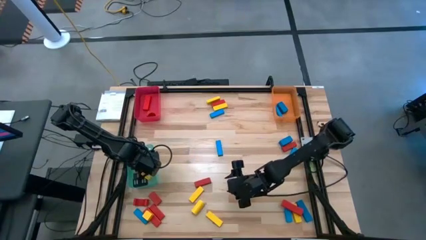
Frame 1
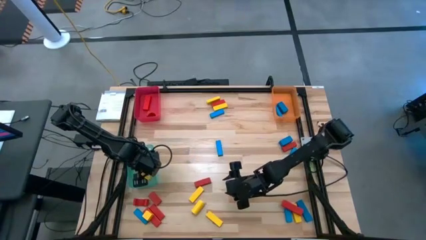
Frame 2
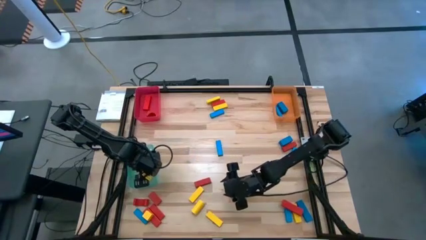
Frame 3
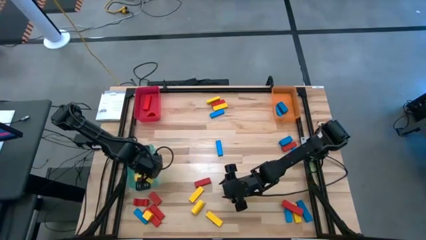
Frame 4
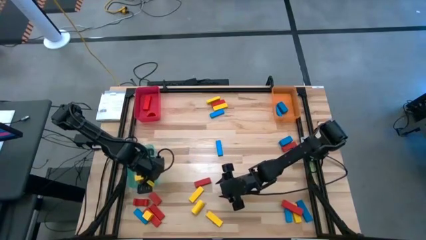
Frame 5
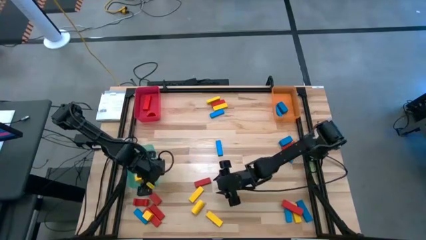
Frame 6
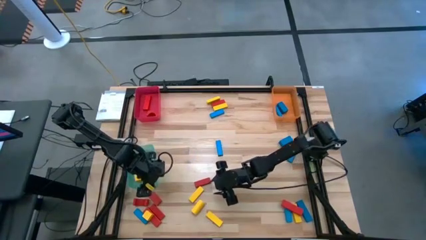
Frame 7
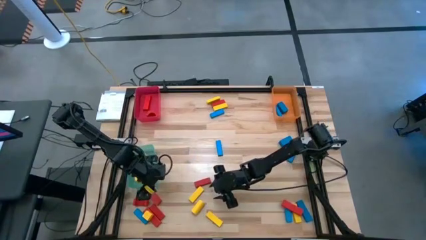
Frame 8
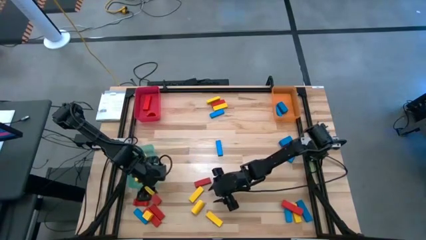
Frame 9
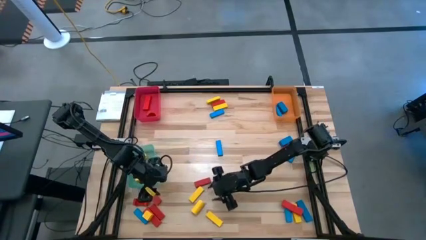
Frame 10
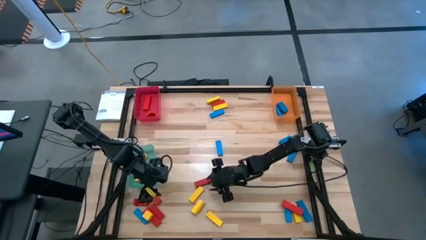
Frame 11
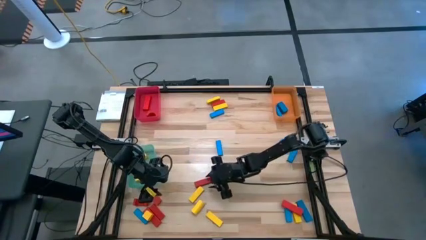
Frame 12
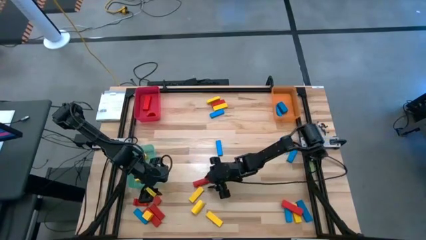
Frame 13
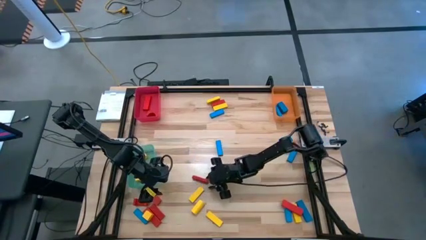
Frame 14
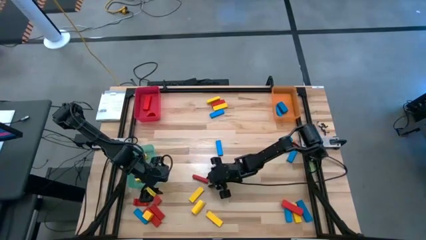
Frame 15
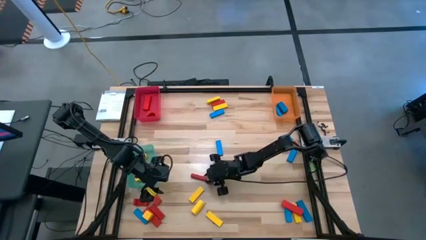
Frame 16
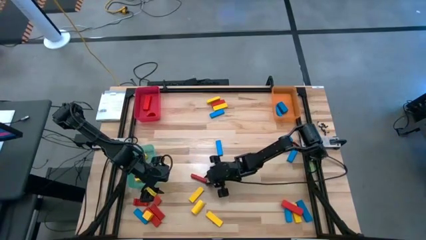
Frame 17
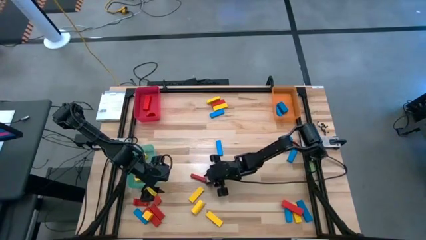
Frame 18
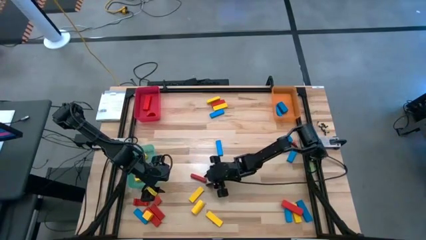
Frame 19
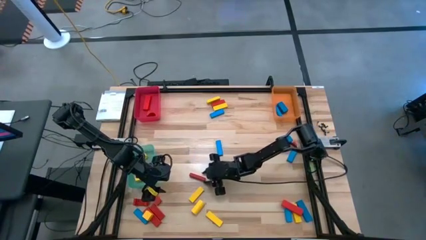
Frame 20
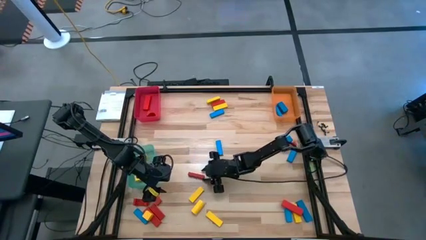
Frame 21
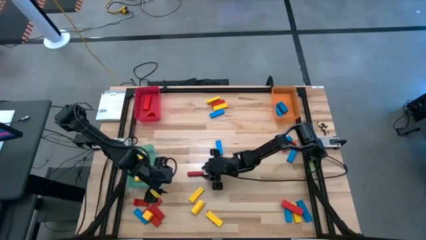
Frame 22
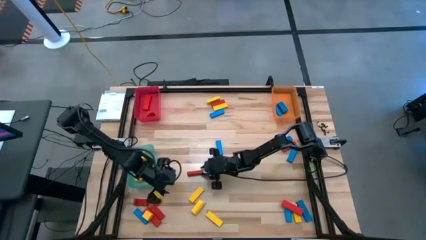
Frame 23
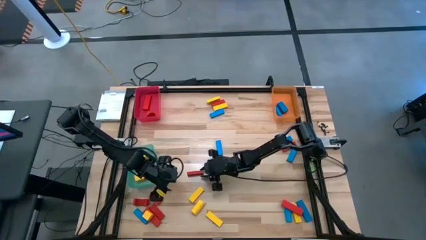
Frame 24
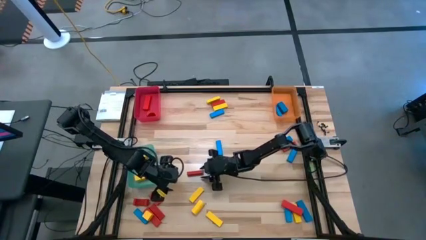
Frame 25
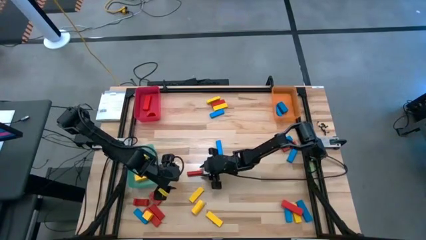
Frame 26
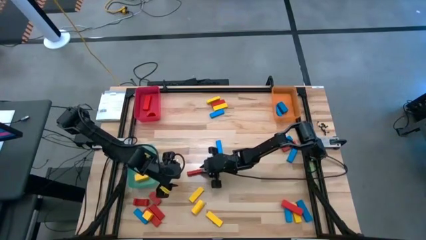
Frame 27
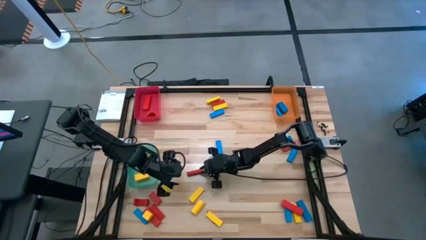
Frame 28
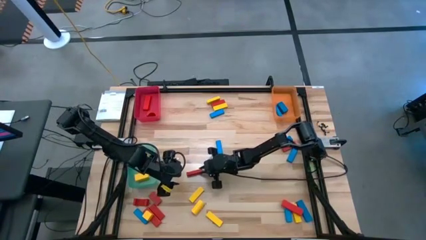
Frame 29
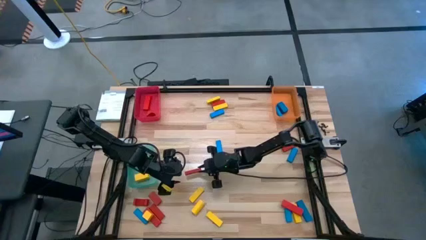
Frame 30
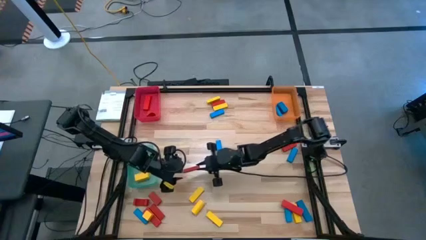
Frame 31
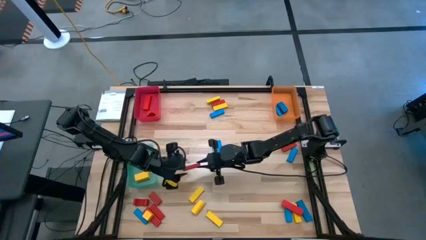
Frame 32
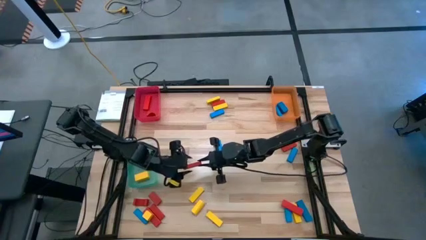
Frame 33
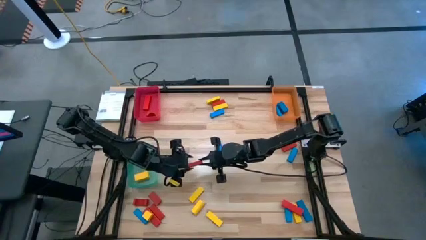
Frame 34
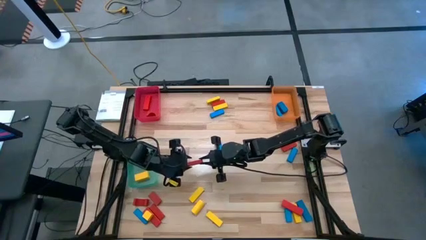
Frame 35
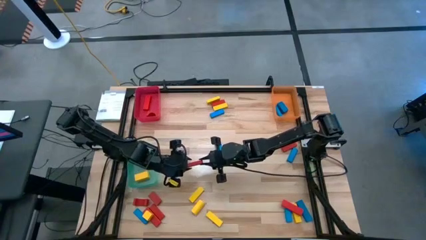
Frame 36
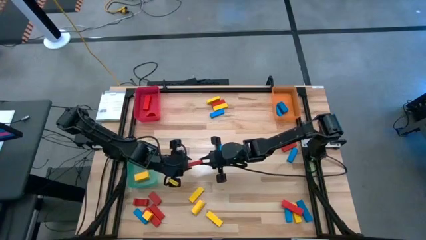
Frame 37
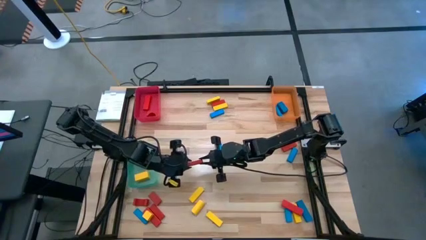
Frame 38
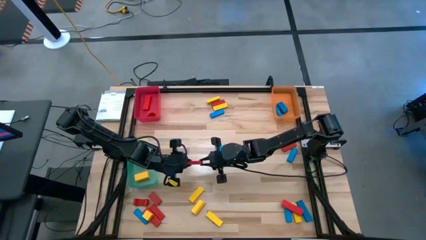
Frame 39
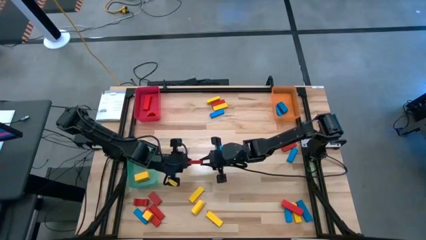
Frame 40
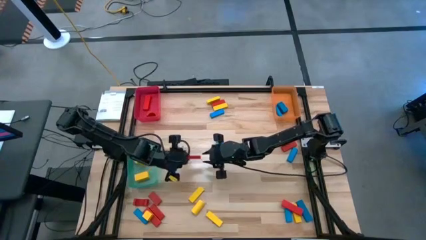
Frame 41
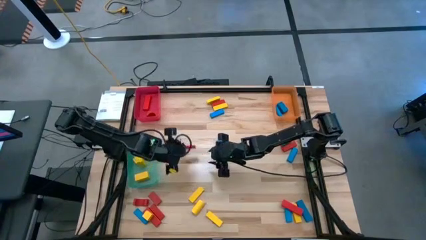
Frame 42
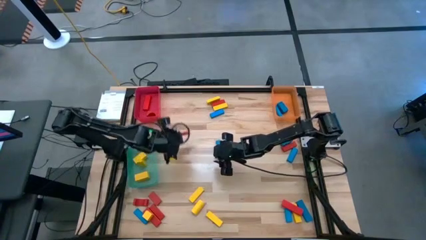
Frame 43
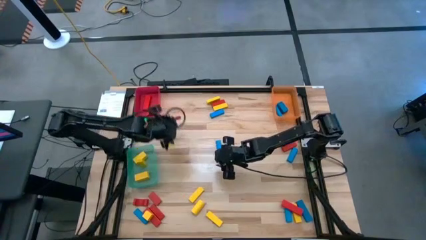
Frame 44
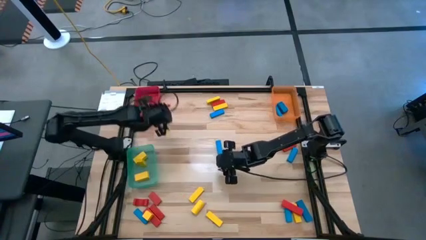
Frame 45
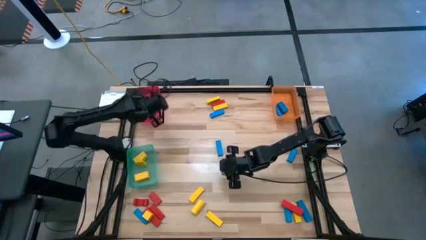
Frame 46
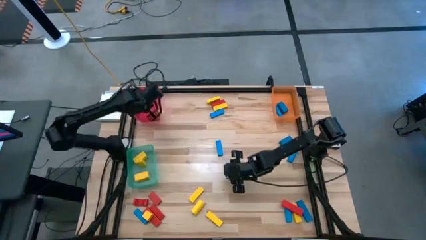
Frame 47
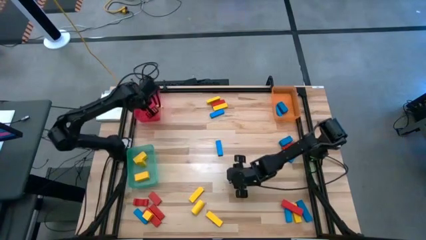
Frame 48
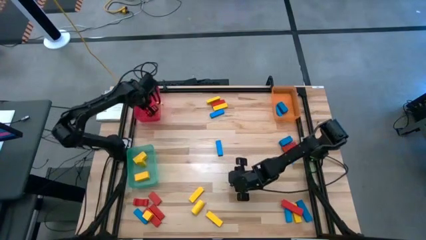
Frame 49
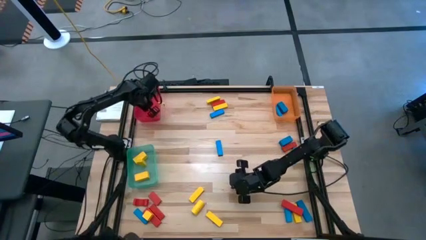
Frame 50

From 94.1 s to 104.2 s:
Task: Sort blocks
Put the red block into the red bin

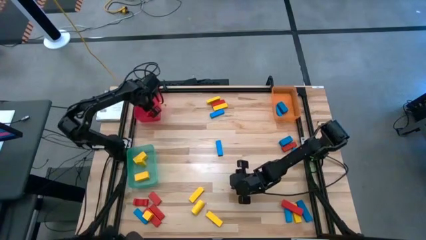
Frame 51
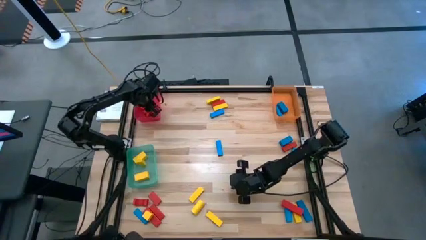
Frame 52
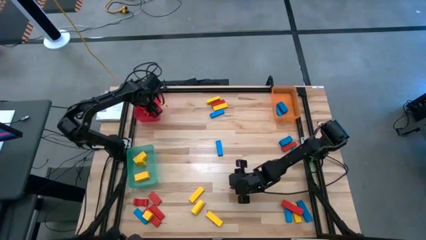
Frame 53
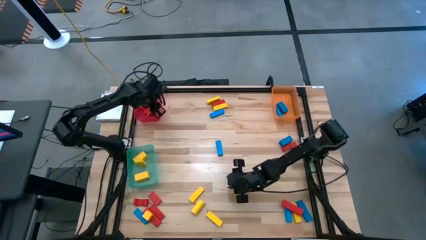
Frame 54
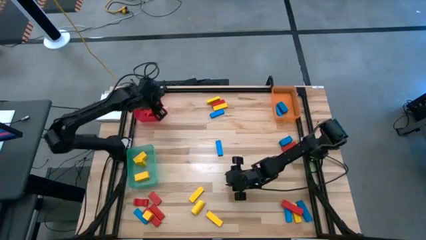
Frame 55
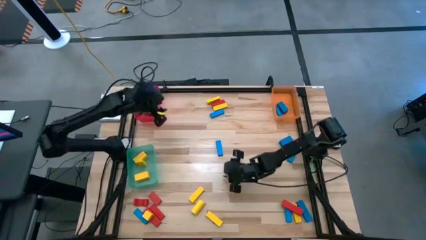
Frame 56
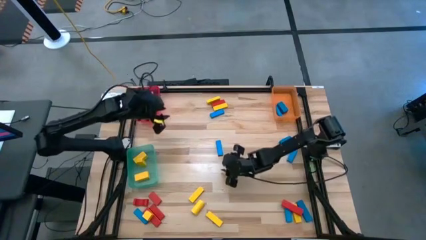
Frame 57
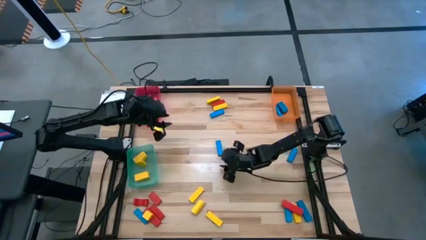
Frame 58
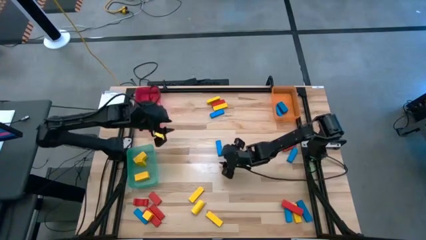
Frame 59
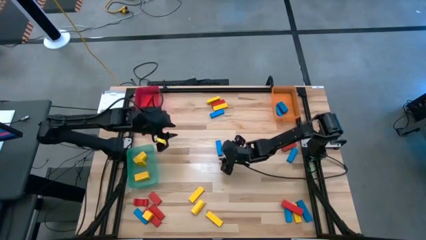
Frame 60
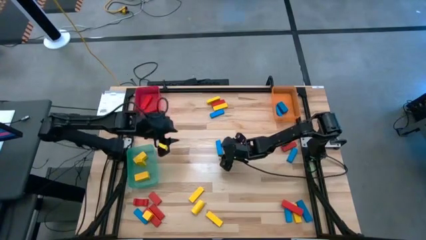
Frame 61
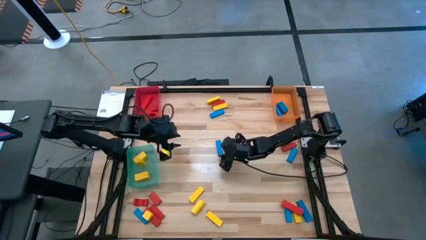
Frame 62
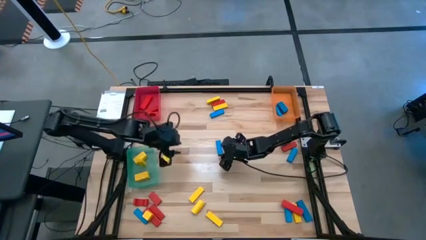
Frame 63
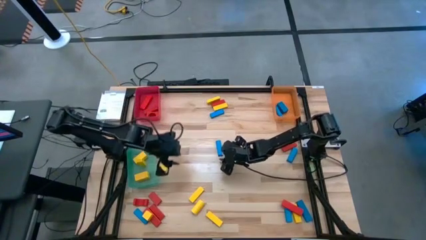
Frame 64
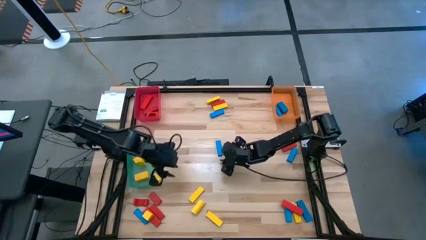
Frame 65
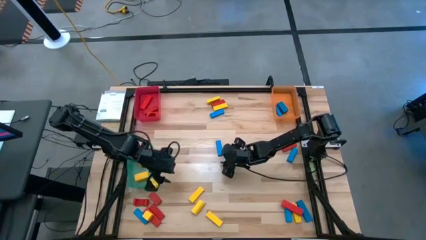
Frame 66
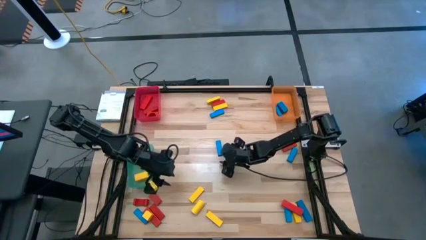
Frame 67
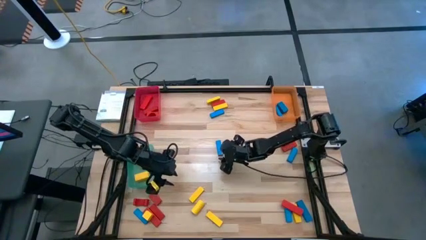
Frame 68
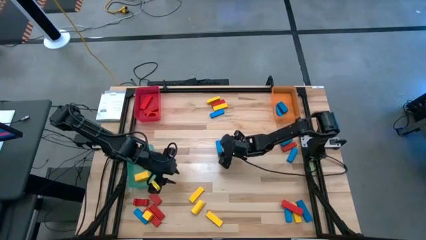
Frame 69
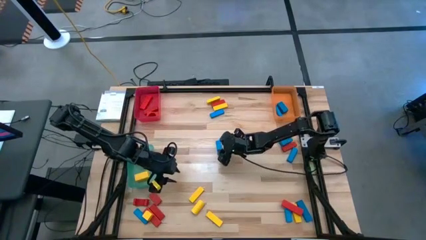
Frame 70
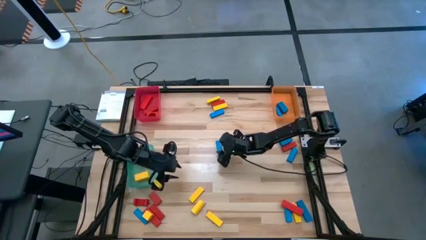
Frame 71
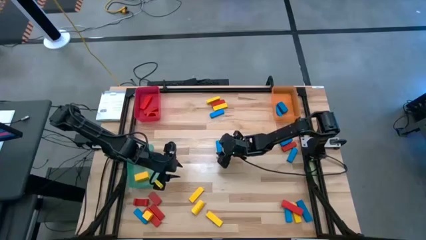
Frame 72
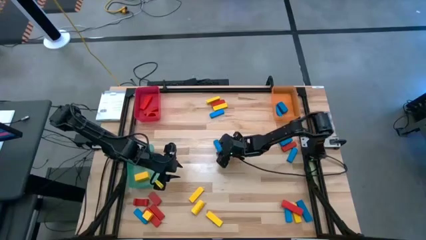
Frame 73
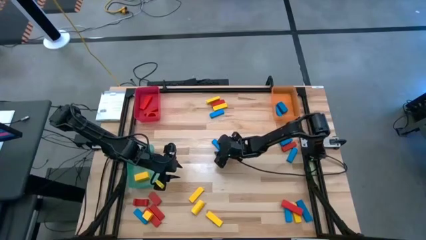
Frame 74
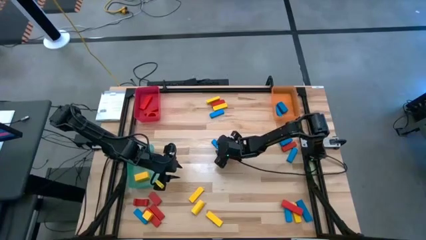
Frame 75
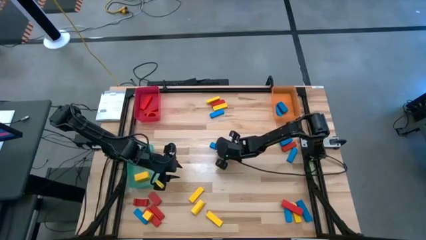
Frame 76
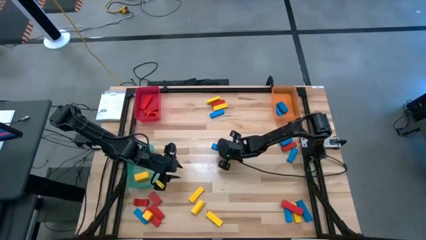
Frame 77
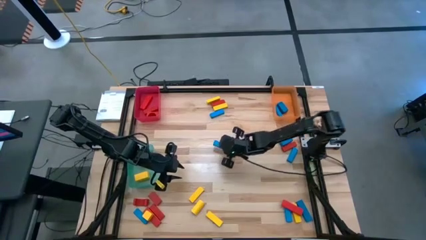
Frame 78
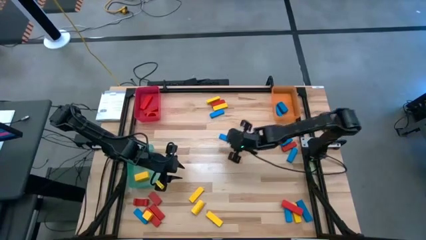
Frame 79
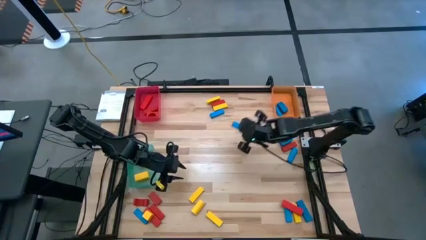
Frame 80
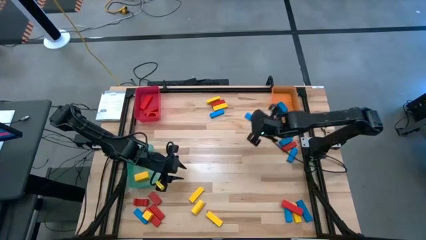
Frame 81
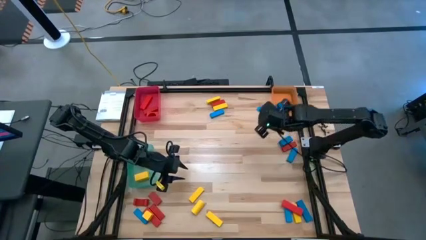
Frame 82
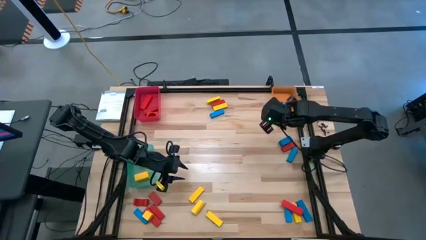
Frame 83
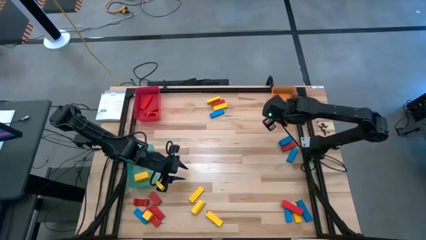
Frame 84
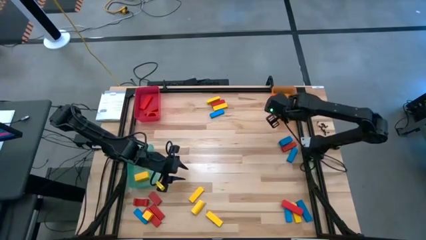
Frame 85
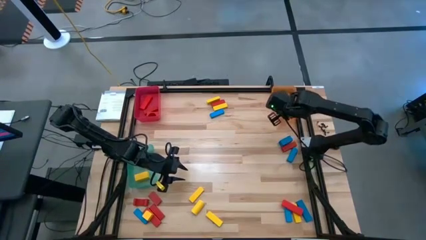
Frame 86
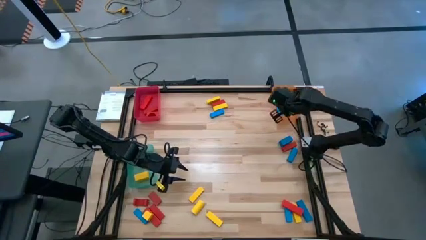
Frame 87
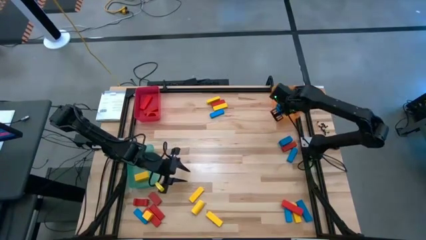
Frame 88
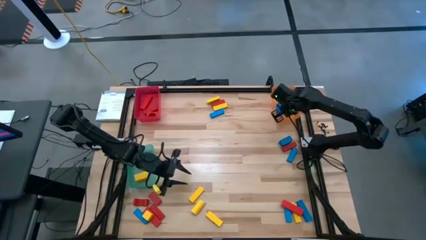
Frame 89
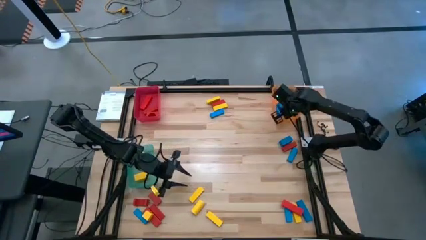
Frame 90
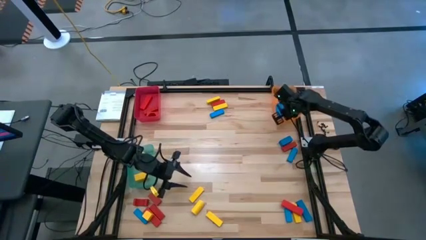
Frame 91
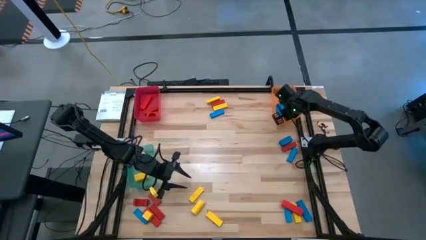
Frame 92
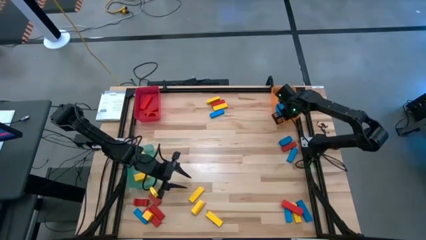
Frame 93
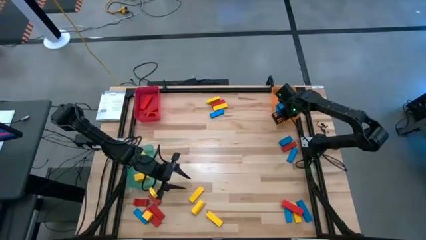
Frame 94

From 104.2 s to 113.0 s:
Put the blue block into the orange bin
